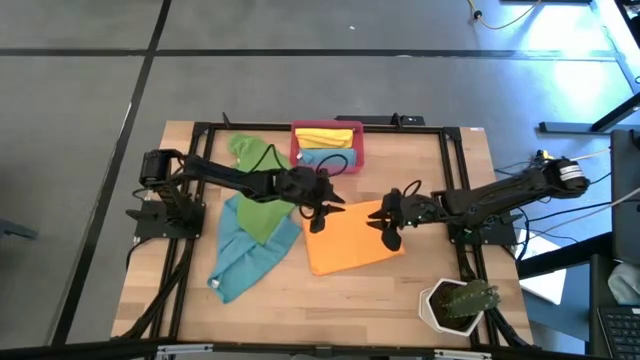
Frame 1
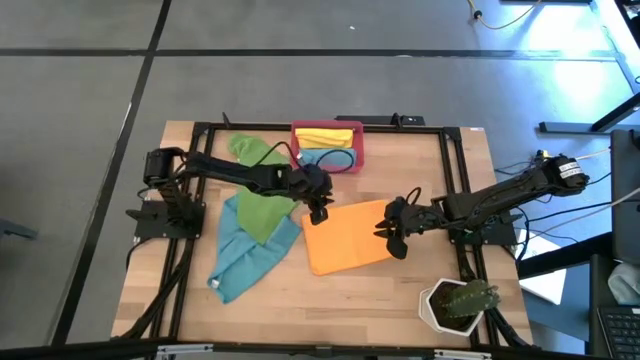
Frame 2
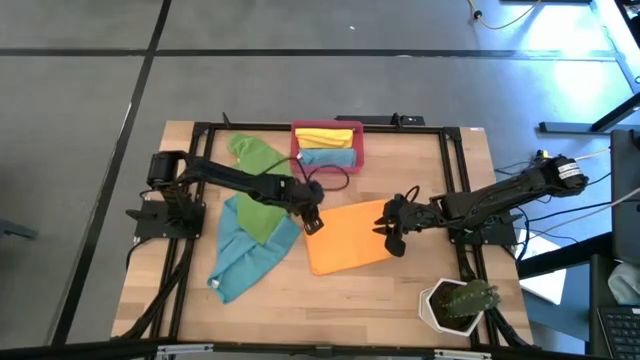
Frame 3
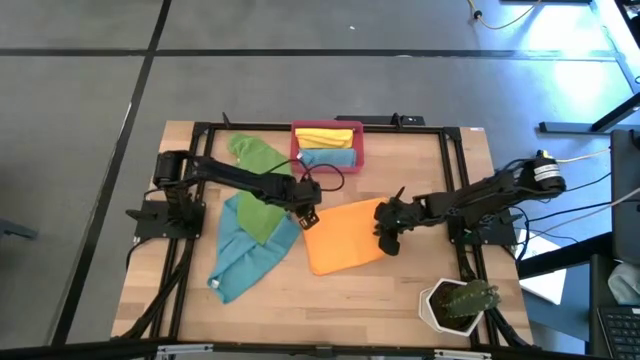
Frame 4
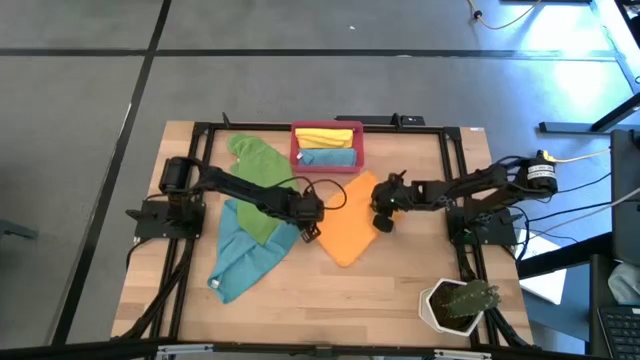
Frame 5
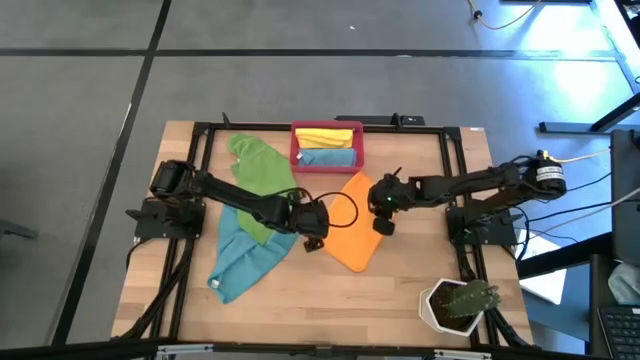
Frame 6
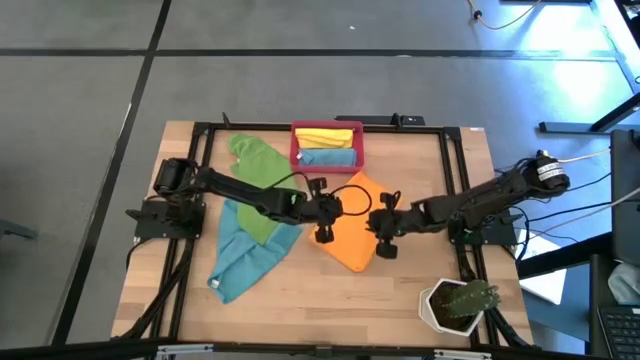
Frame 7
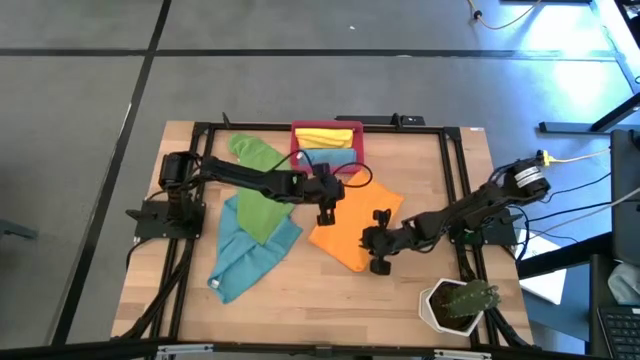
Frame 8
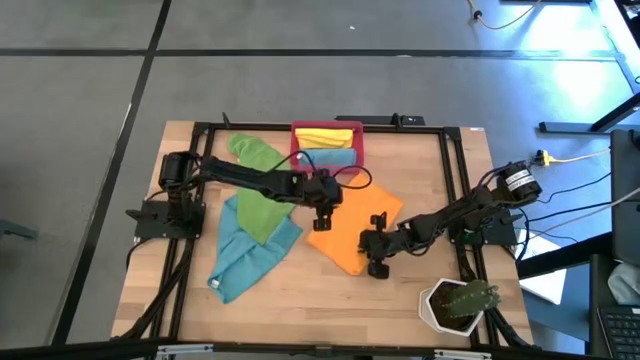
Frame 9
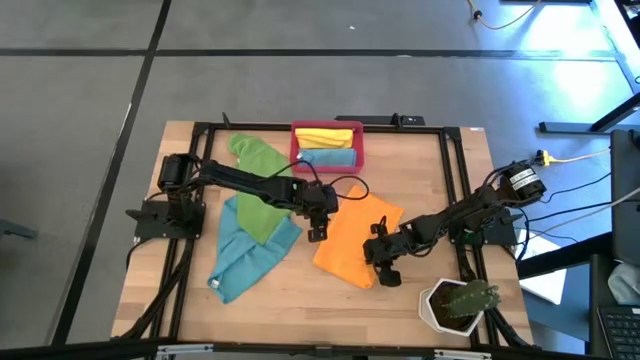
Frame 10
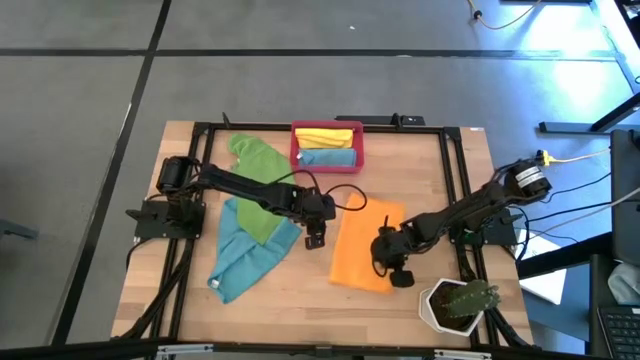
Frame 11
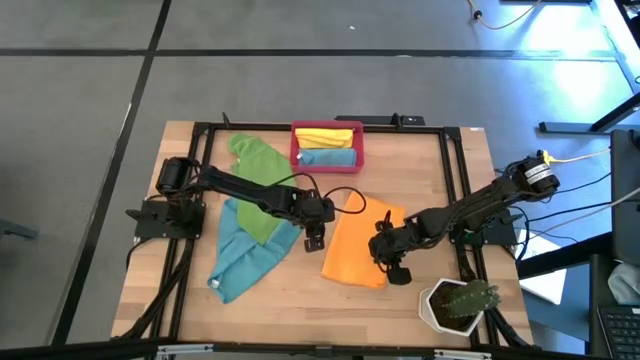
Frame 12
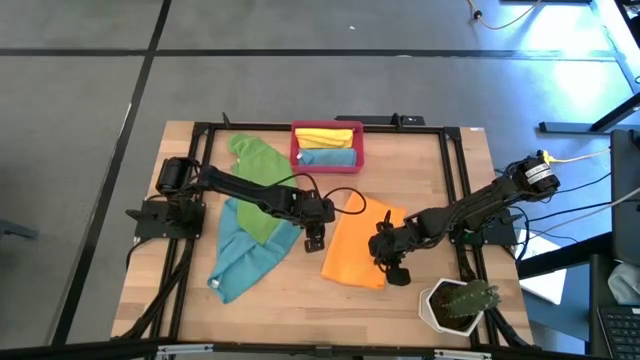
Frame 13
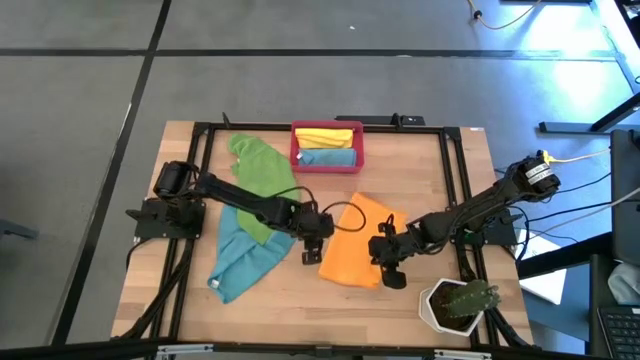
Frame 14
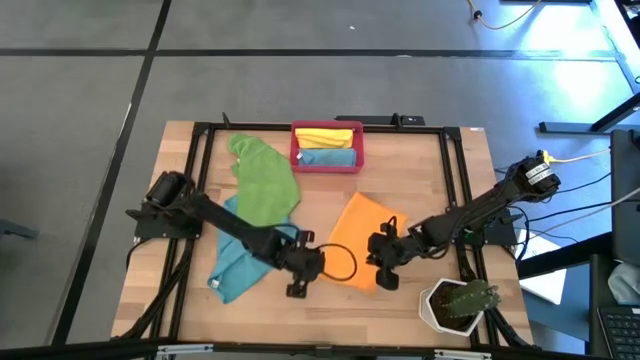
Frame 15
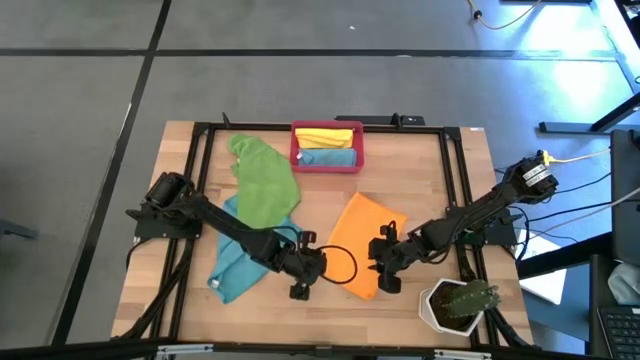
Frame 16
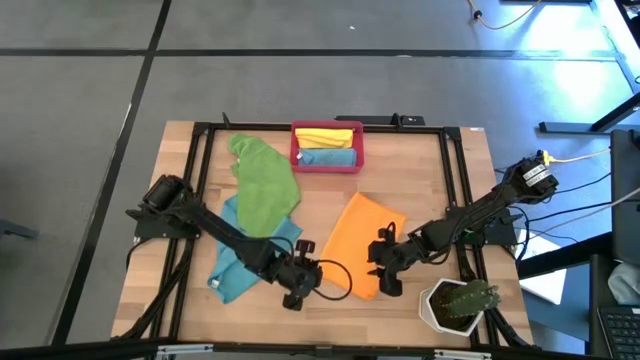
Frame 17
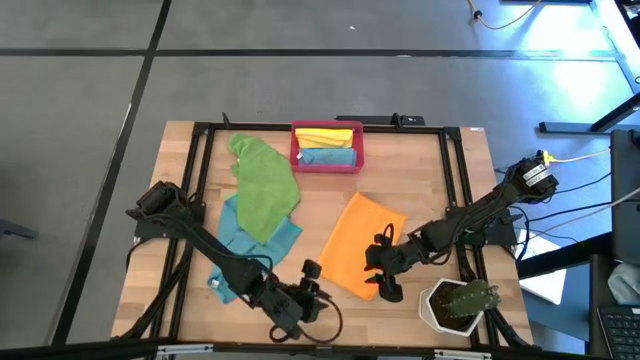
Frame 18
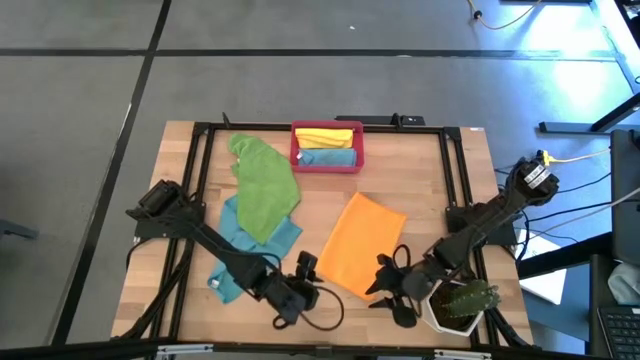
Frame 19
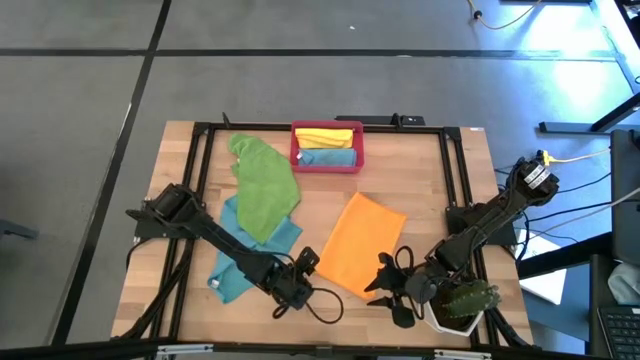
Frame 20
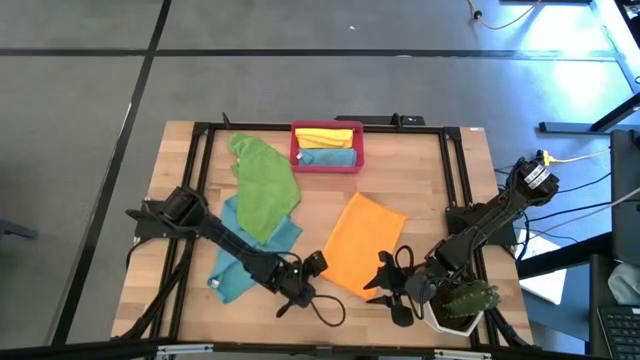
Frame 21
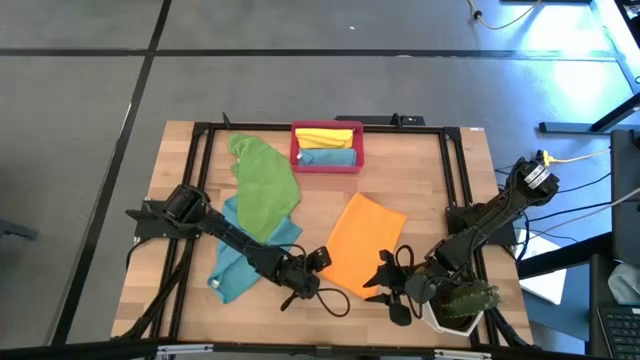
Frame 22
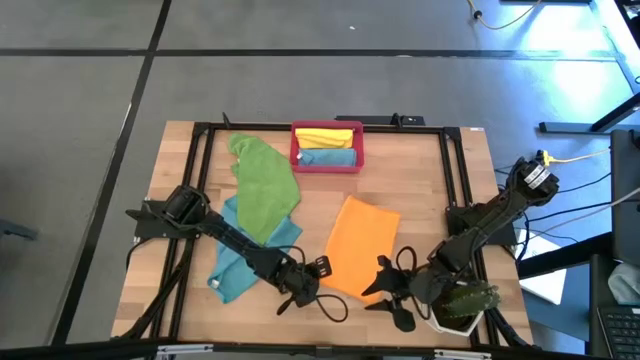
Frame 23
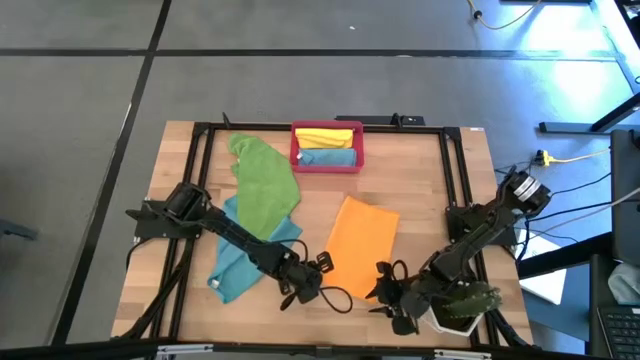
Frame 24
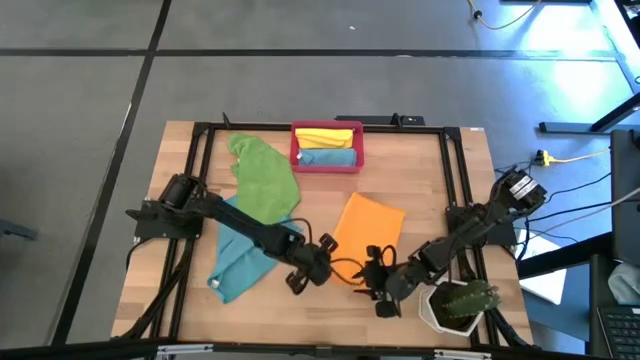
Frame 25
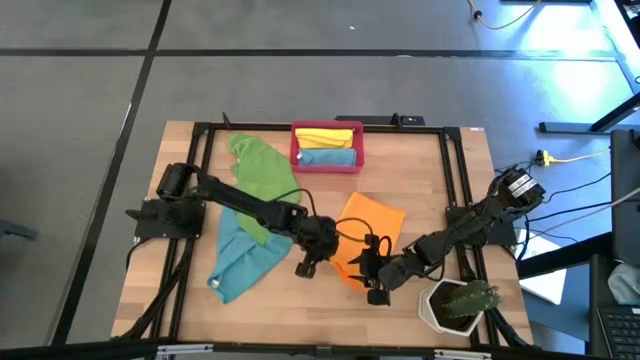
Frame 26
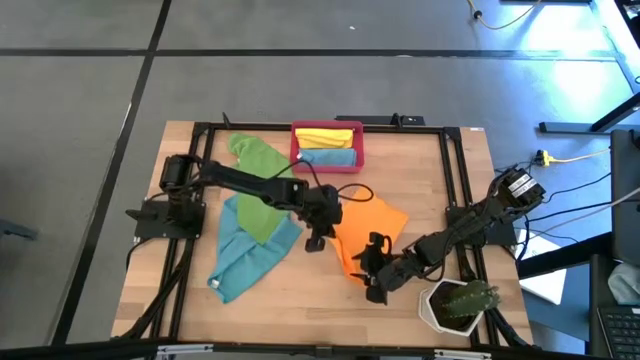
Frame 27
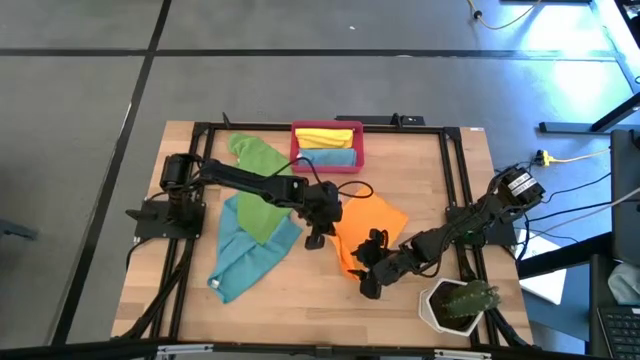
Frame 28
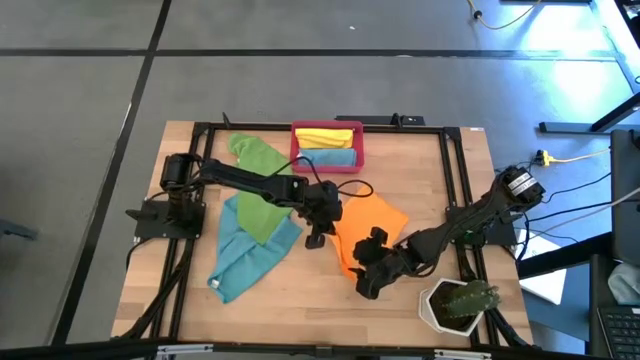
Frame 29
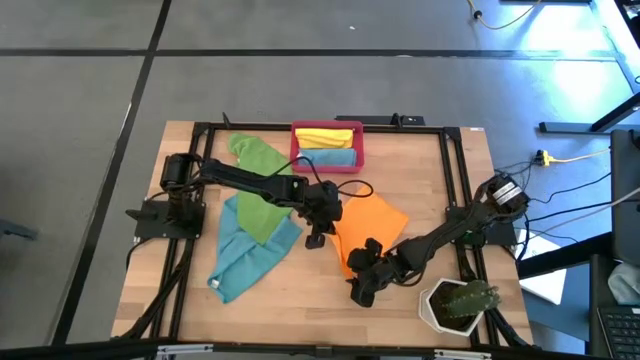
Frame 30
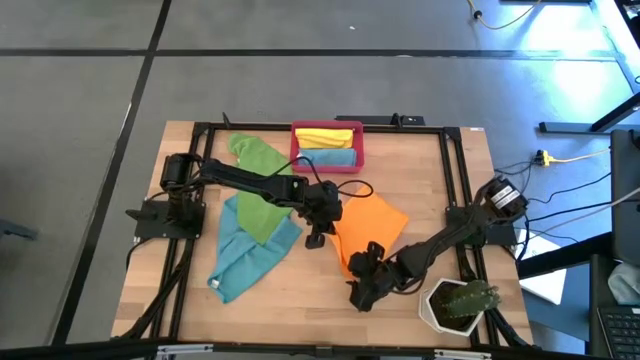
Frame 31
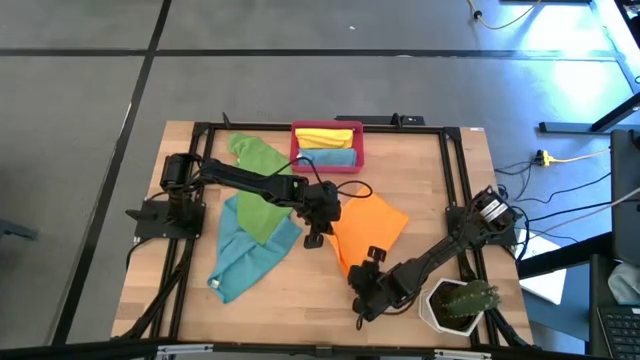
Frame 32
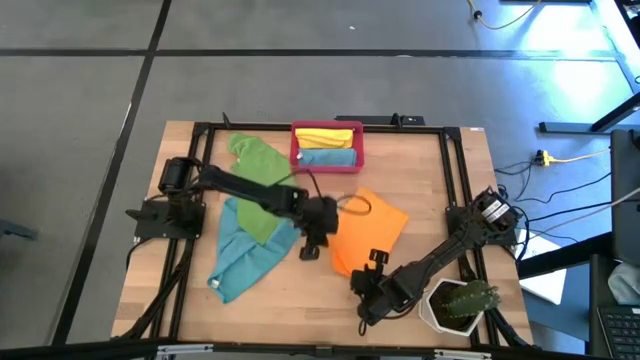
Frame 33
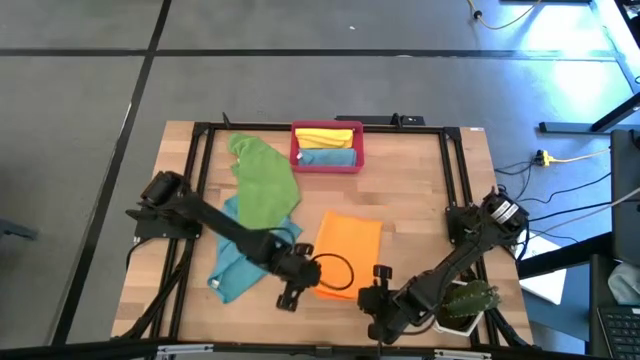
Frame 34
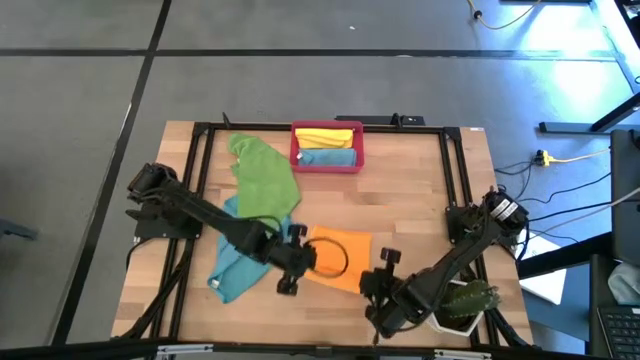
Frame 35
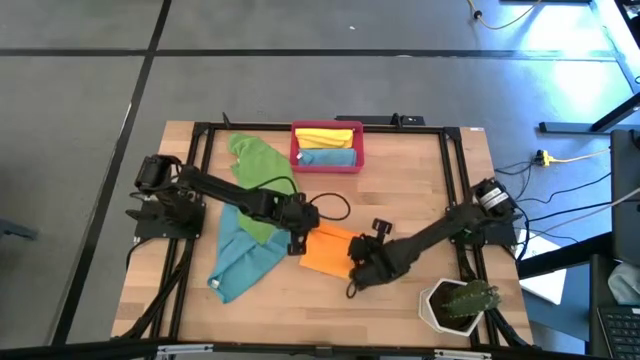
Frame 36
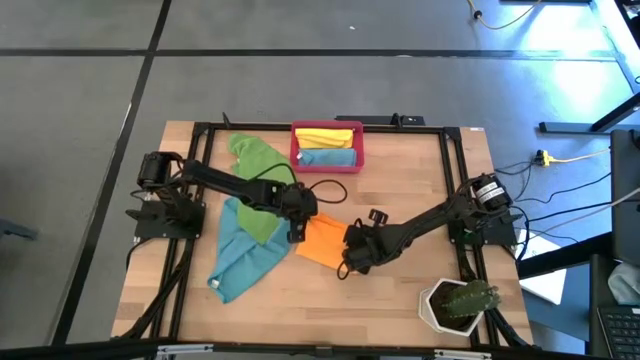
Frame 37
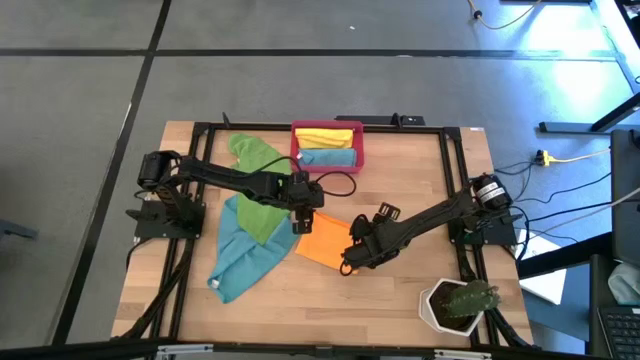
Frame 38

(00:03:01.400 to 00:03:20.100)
Task: Roll microfiber towels into tight, uniform cylinder then place into a basket
Fold the orange microfiber towel

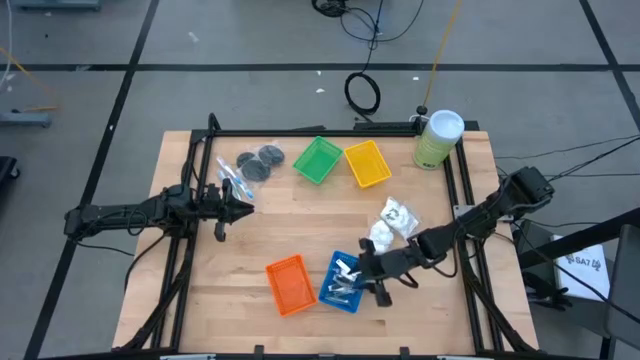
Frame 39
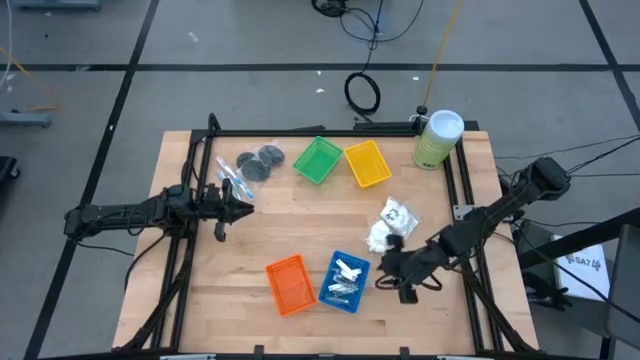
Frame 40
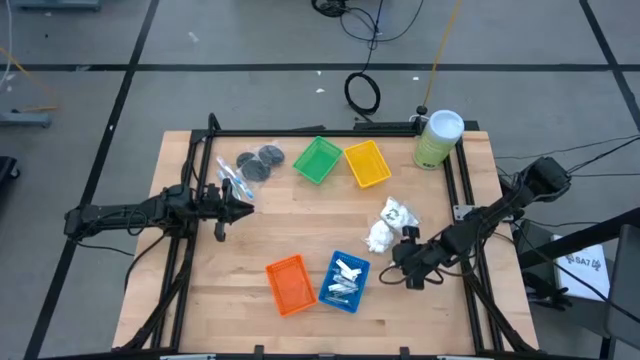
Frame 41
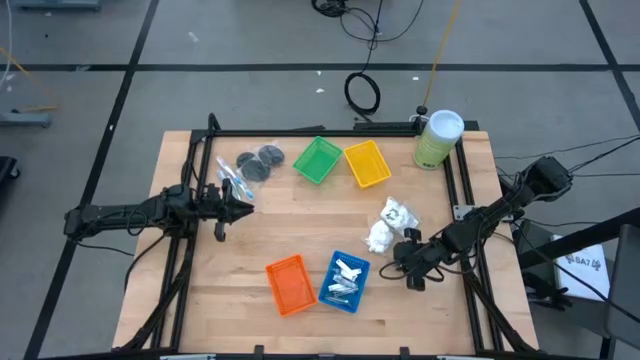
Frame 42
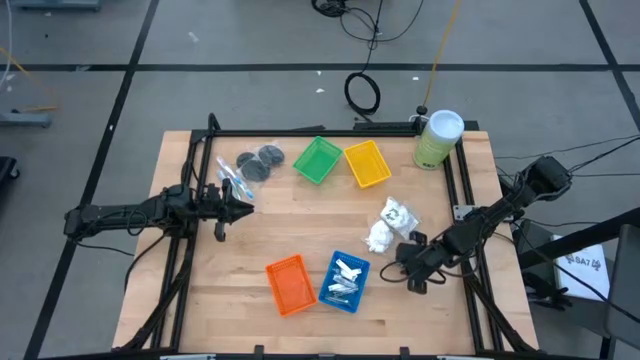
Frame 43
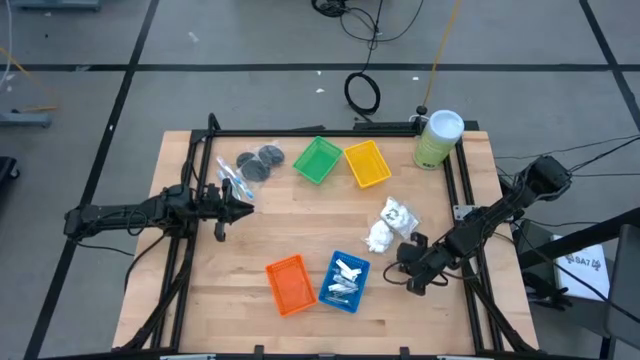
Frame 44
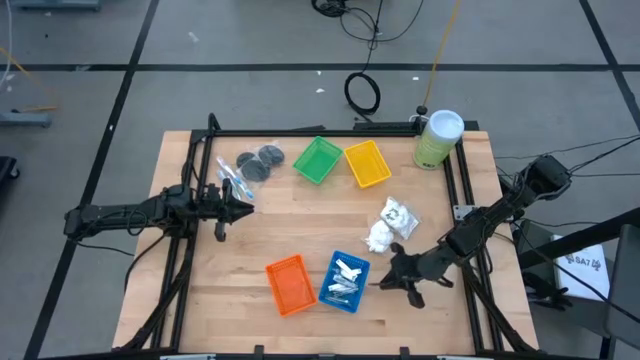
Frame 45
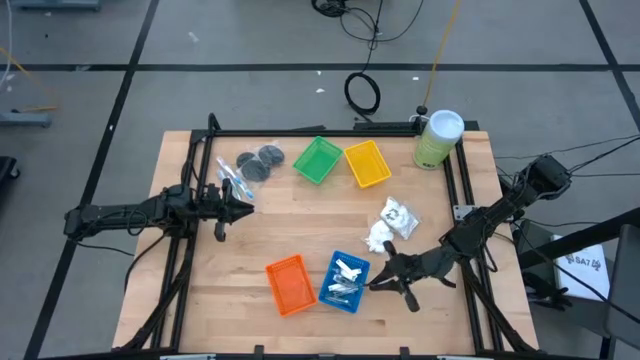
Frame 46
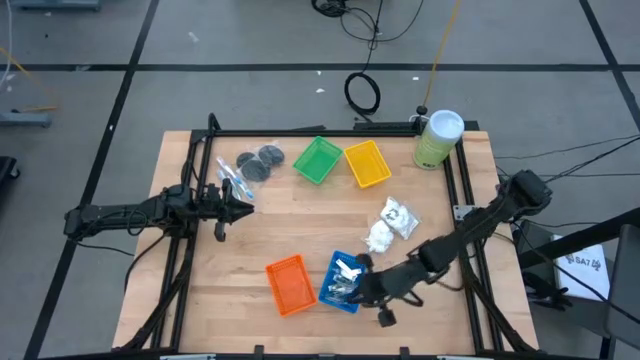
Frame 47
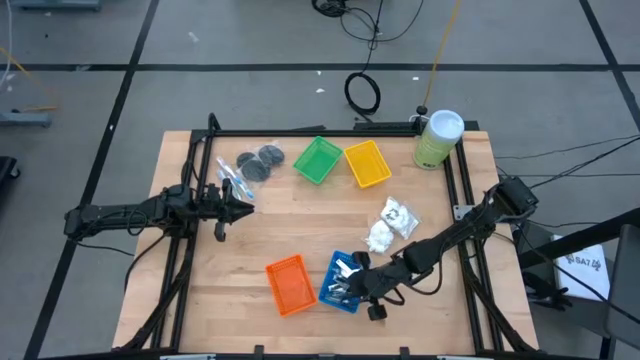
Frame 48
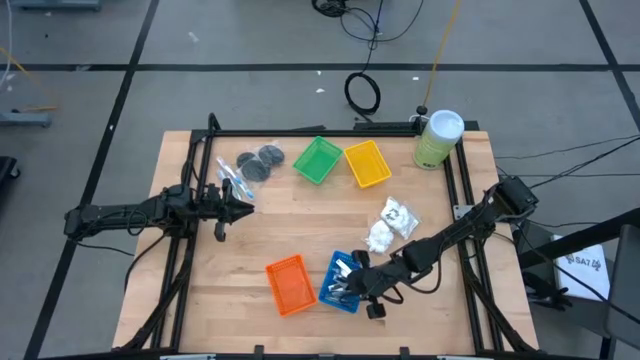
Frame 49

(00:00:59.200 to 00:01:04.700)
Task: Pick & Place Travel size toiletries
Put the silver nail cutter into the blue bin
